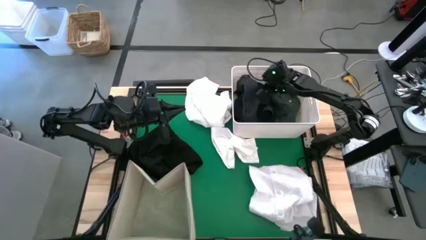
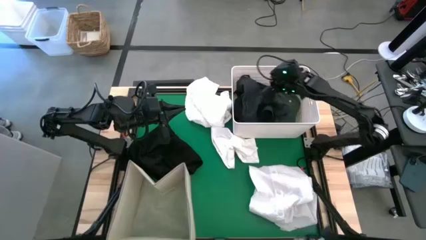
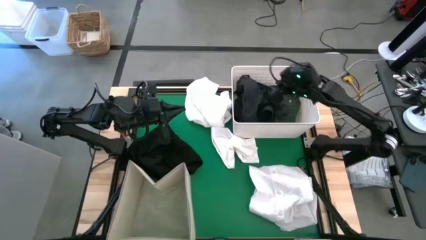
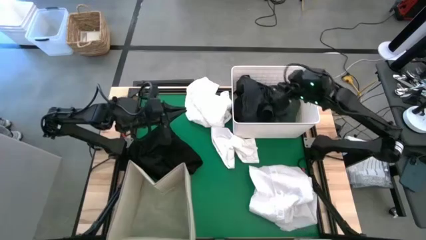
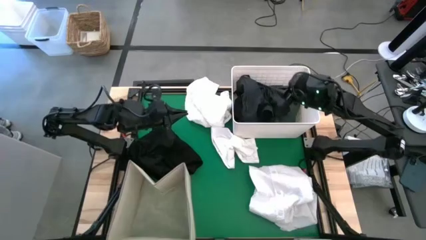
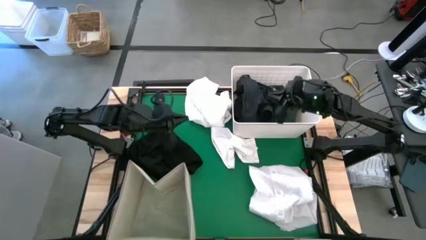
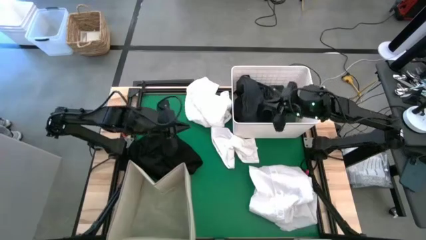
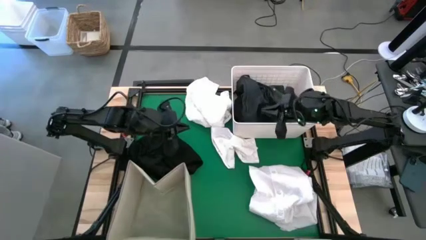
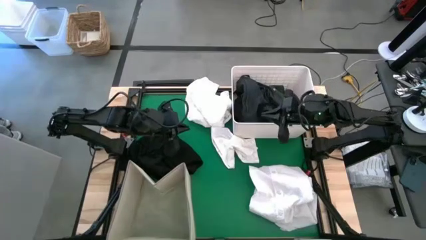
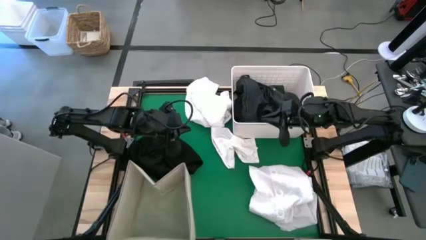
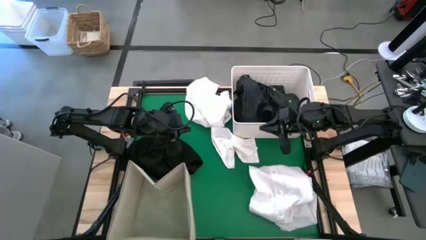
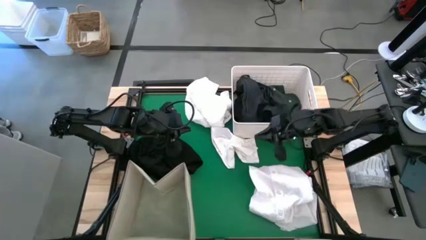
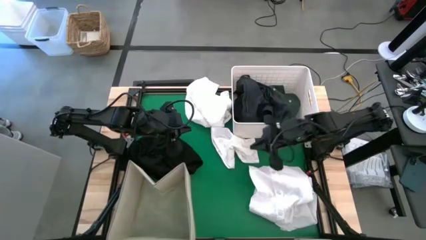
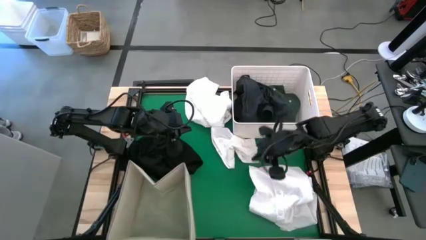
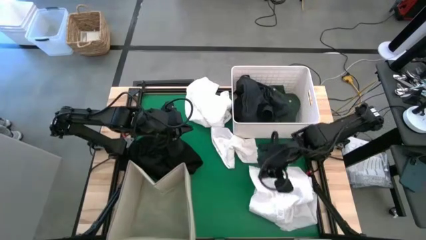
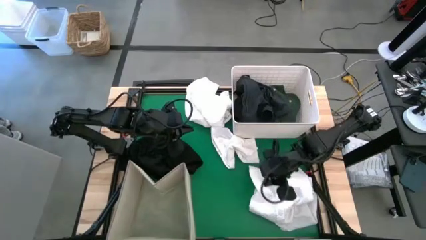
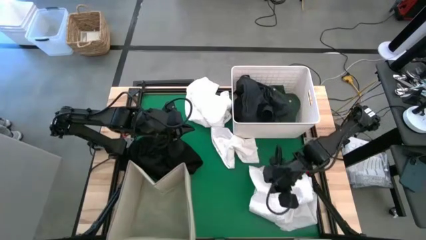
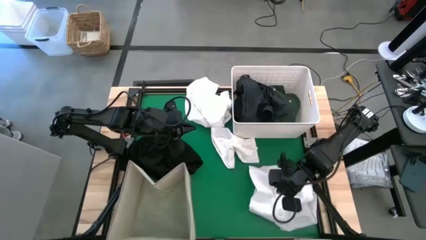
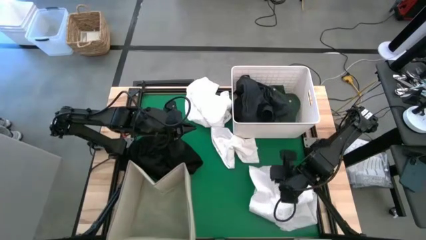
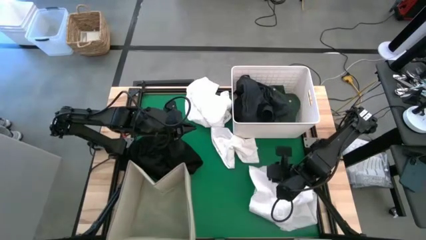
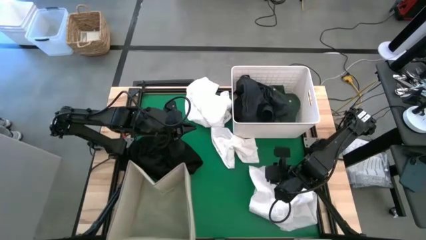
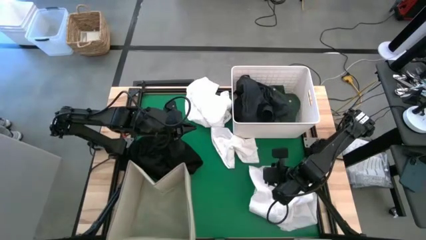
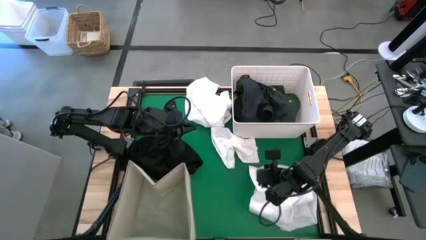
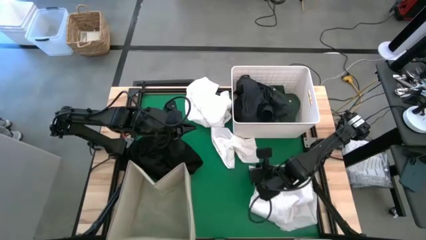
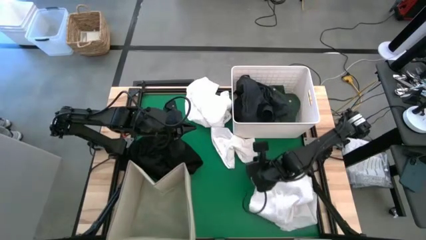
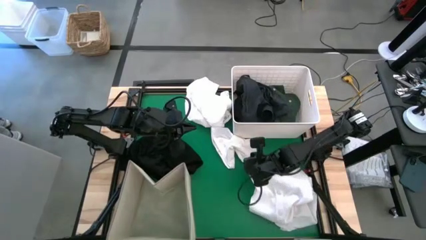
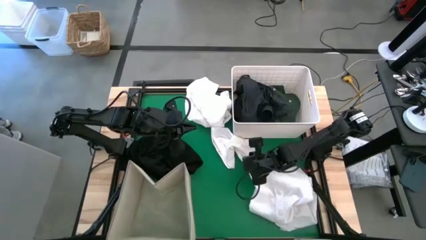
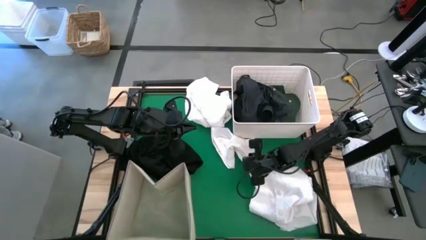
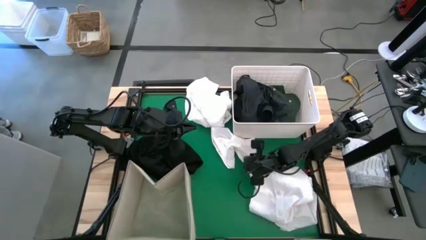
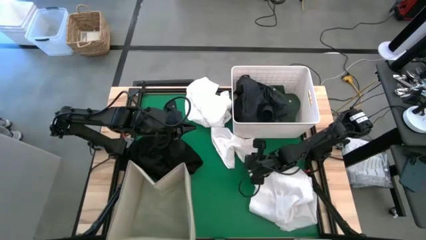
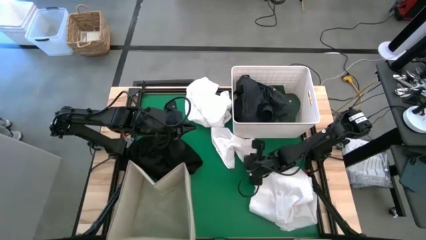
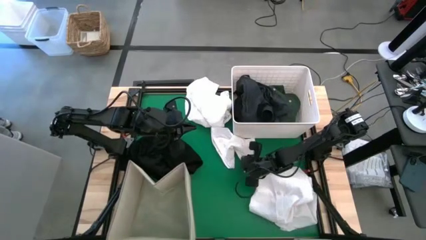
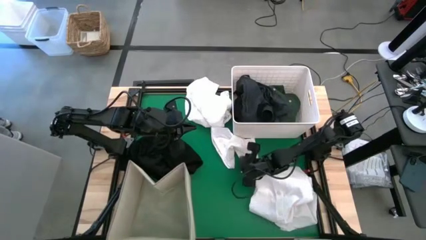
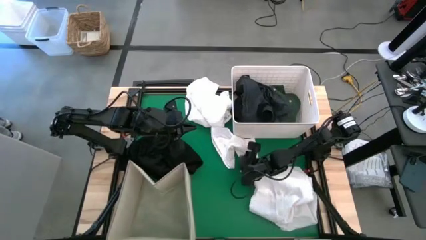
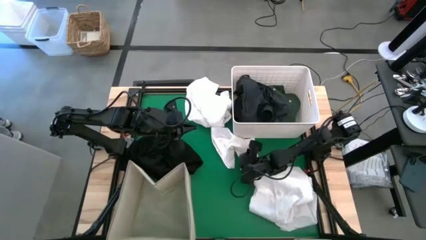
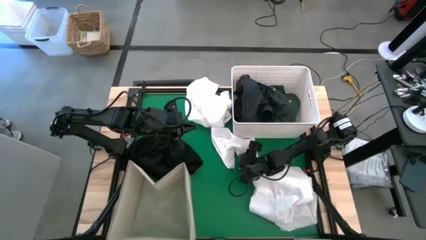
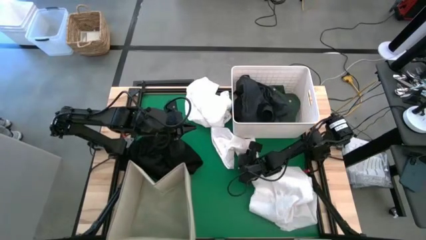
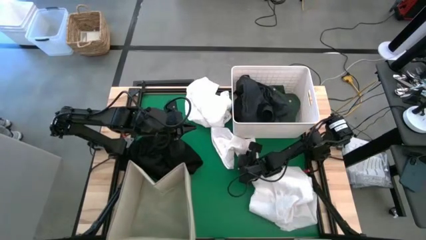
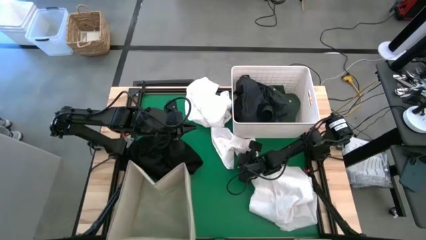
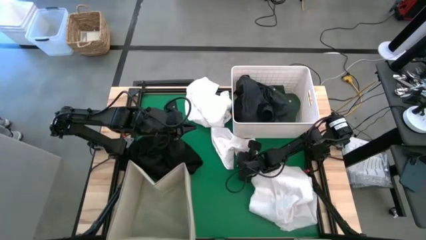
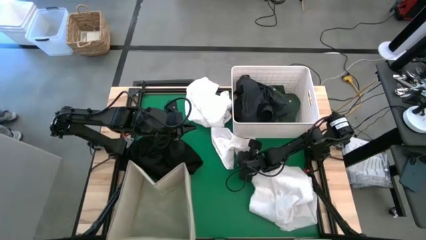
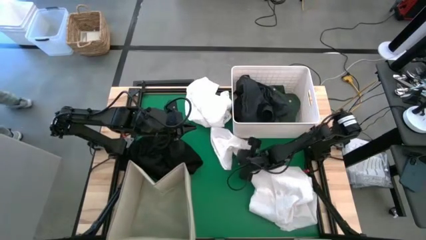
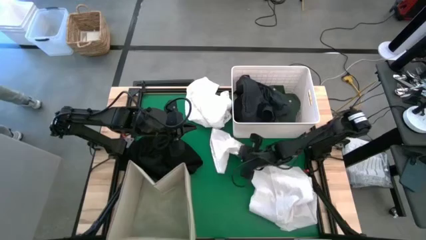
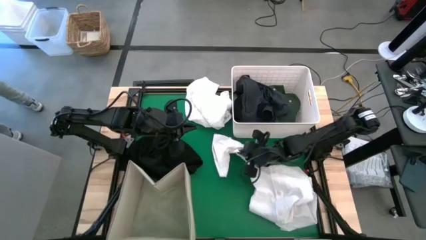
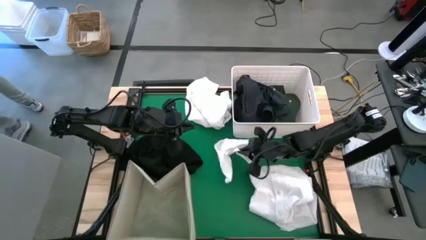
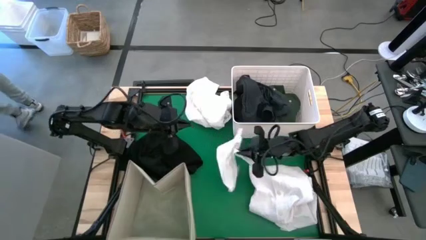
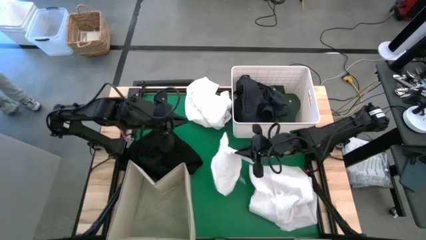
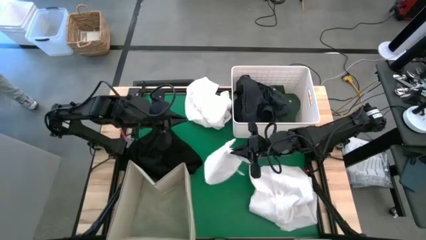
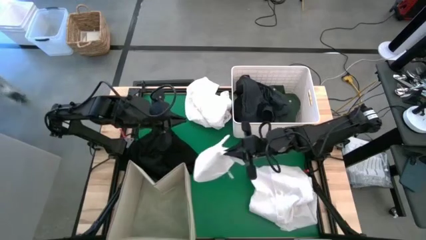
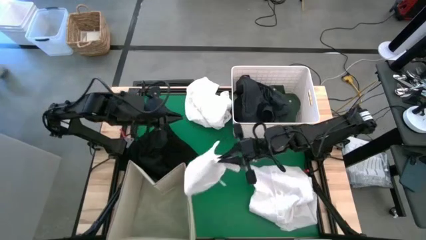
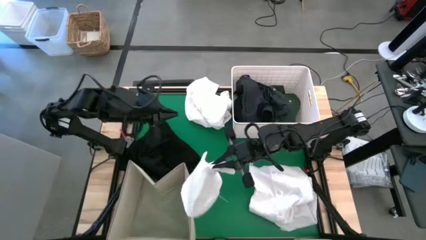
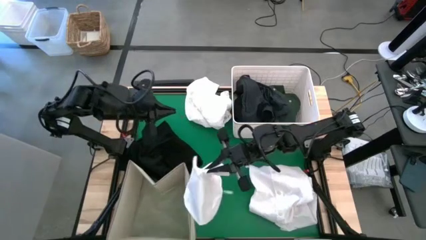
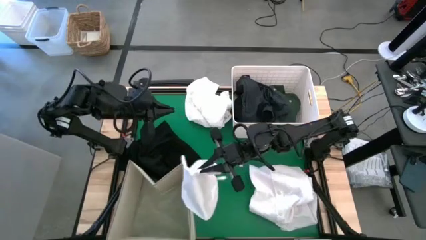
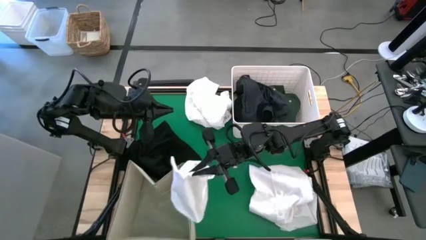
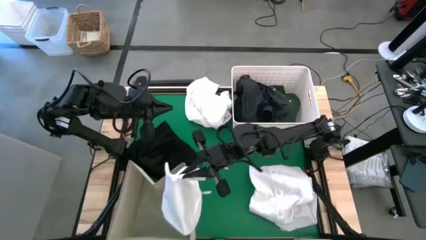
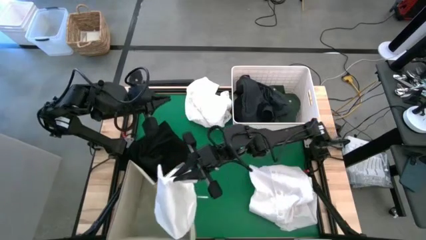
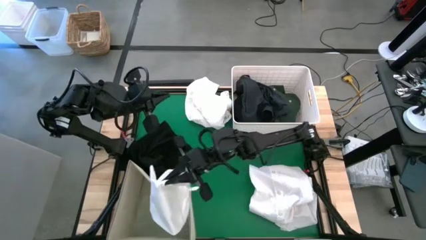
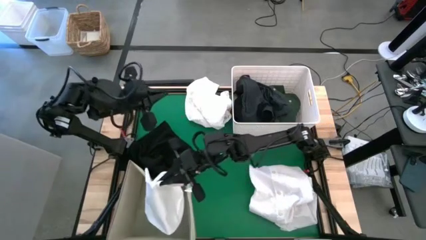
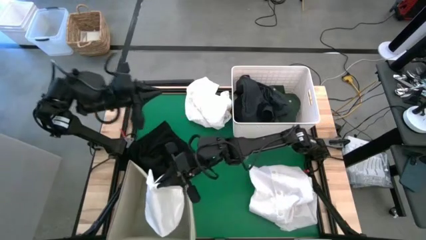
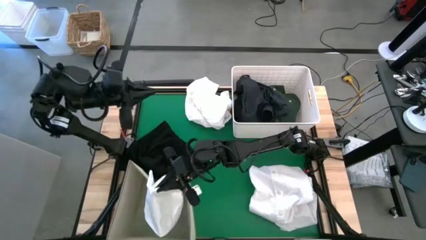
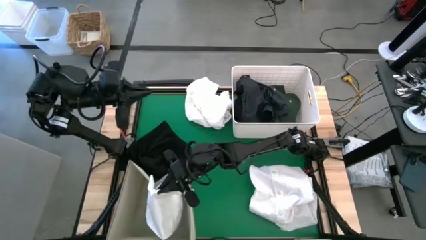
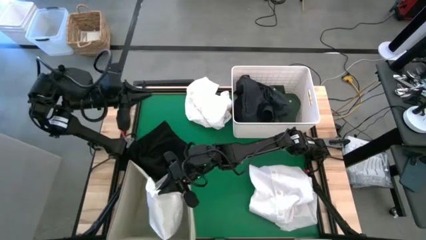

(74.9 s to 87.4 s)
Task: Sort clothes
Put the white shorts into the bottom left white bin
